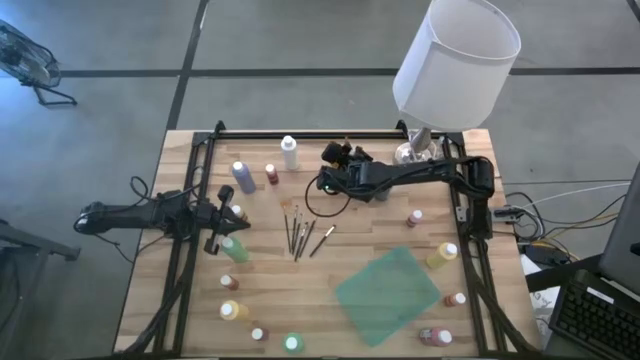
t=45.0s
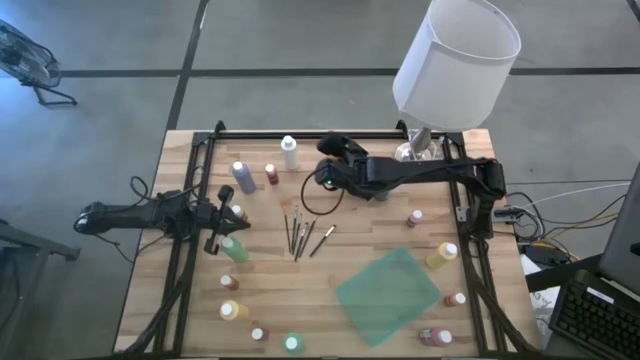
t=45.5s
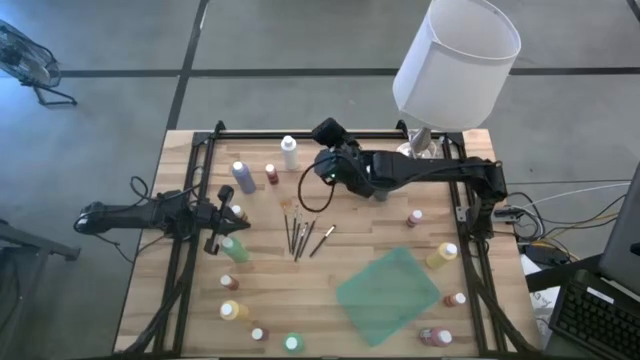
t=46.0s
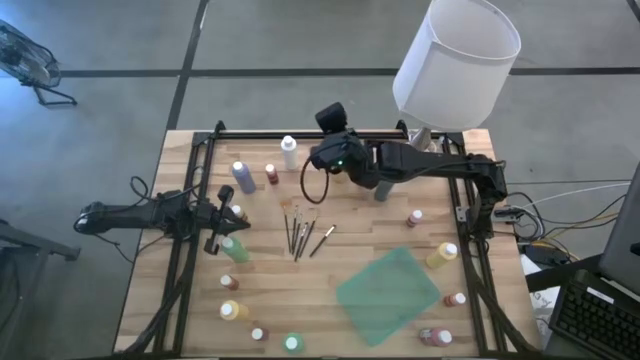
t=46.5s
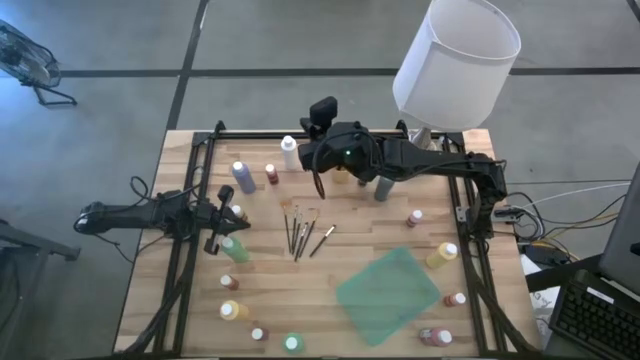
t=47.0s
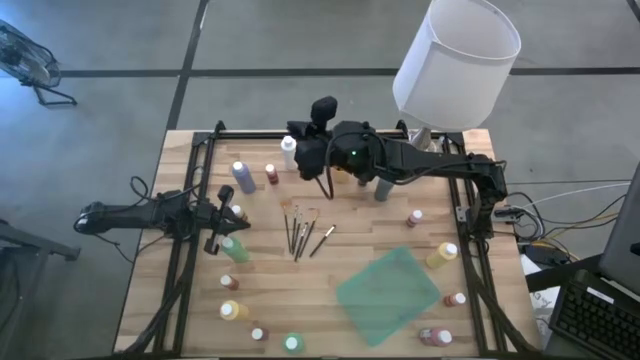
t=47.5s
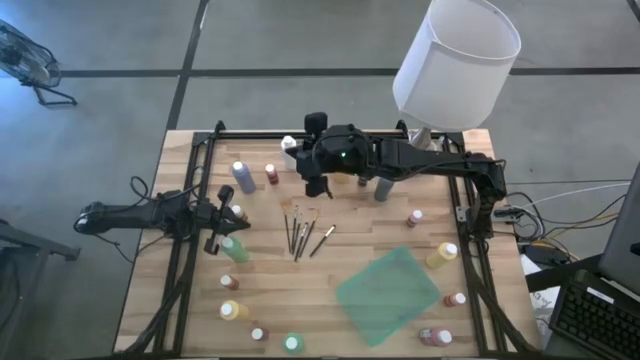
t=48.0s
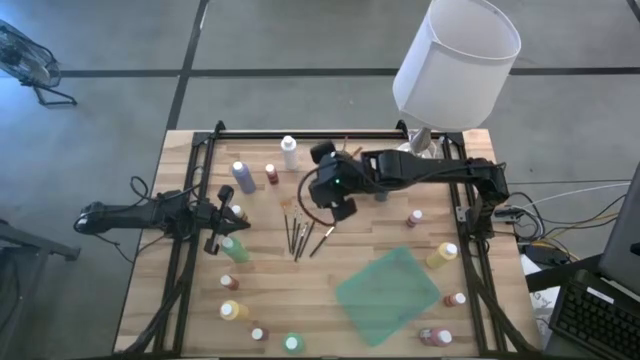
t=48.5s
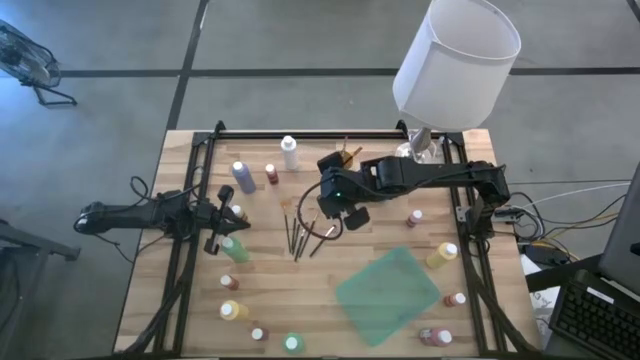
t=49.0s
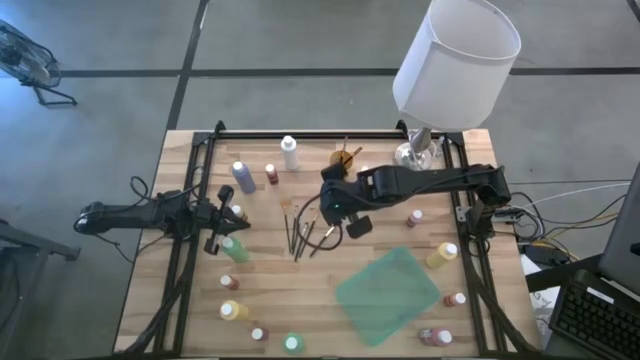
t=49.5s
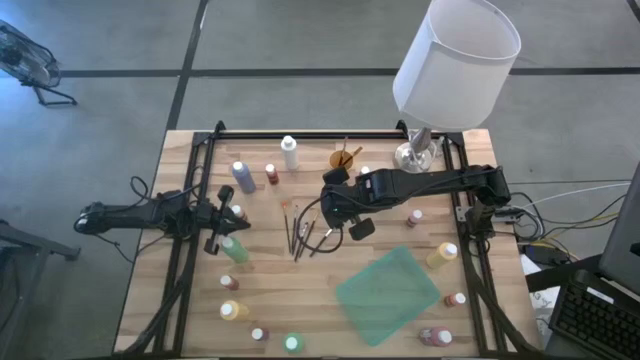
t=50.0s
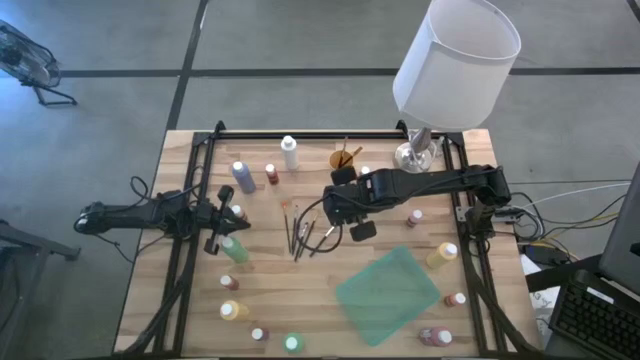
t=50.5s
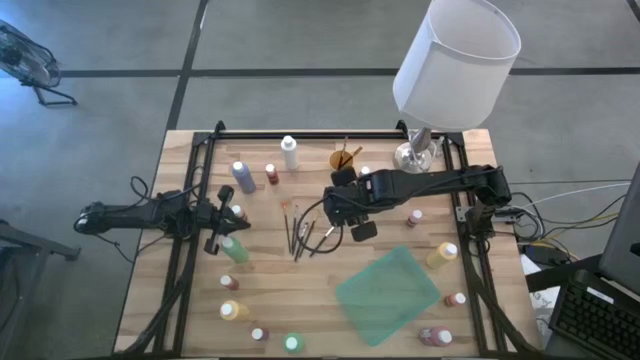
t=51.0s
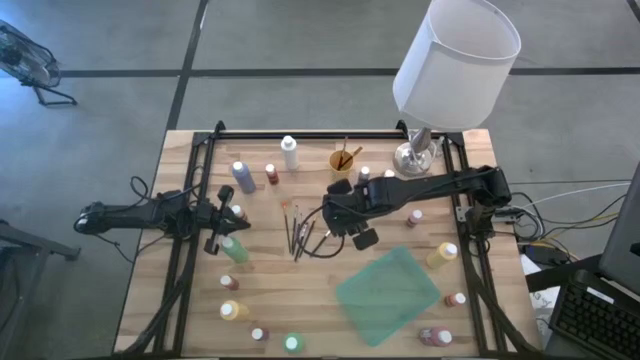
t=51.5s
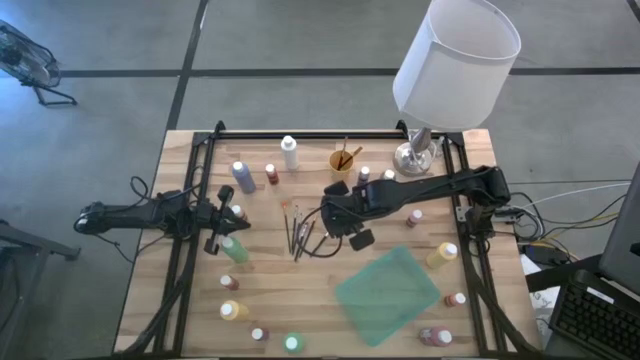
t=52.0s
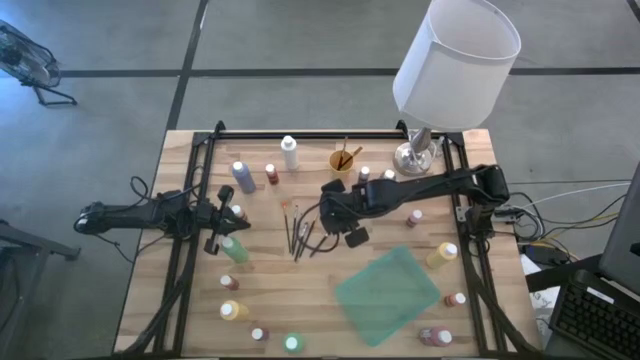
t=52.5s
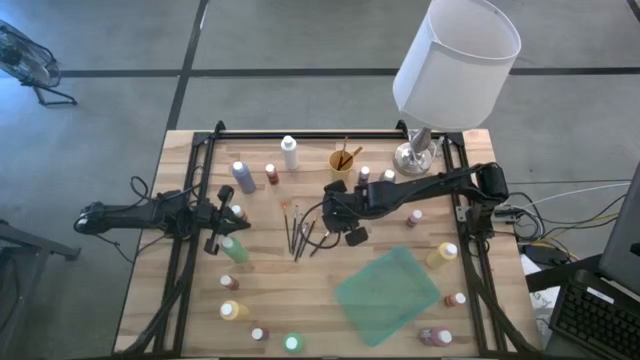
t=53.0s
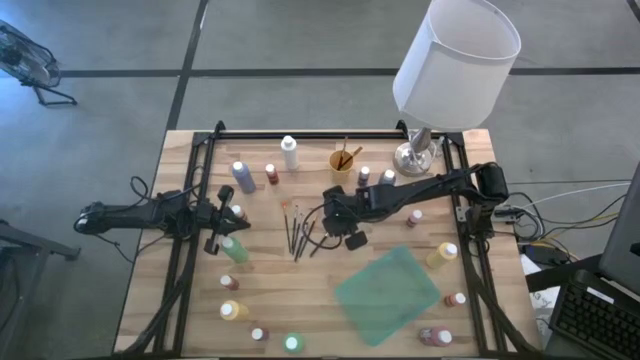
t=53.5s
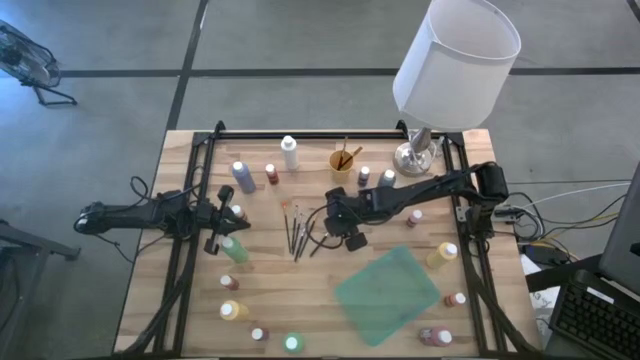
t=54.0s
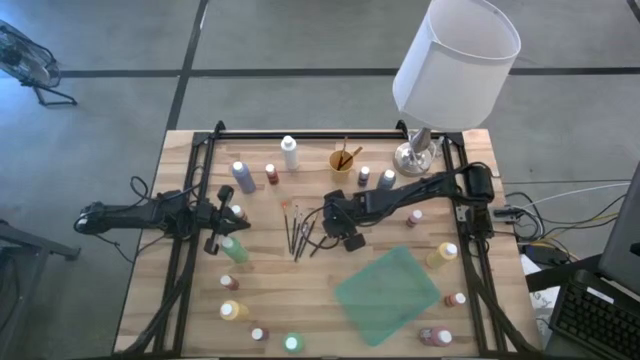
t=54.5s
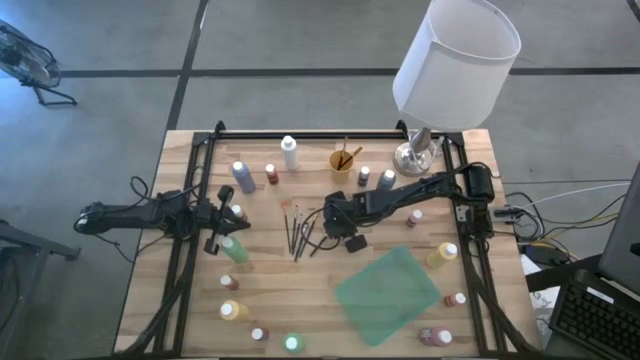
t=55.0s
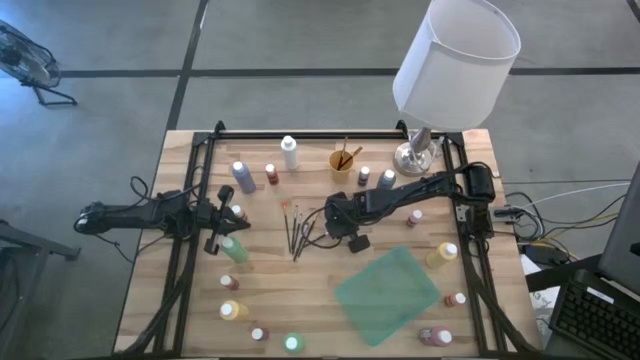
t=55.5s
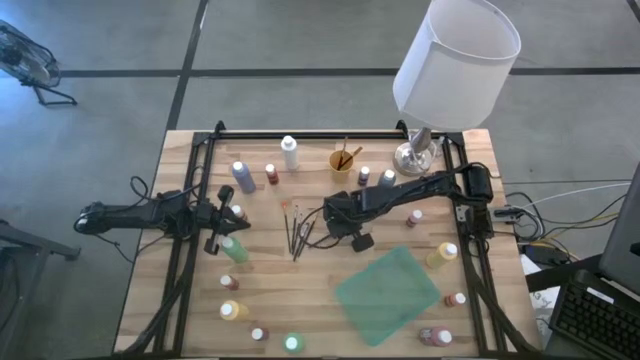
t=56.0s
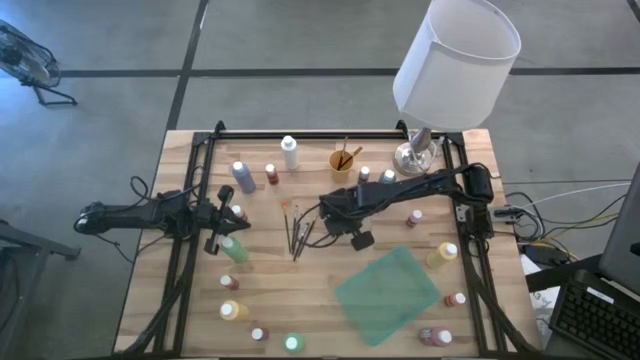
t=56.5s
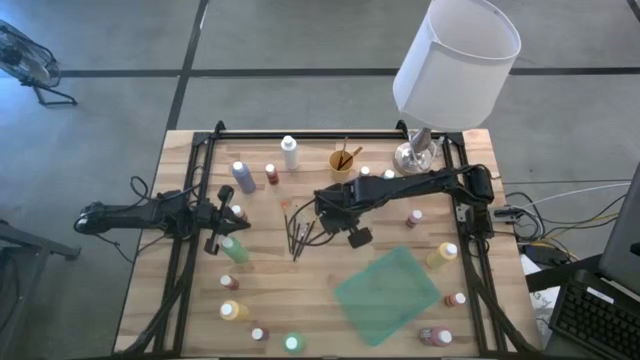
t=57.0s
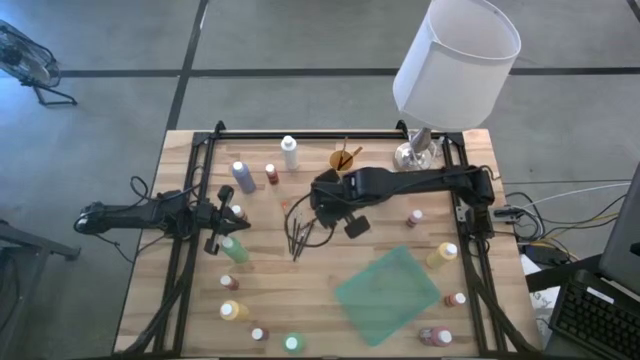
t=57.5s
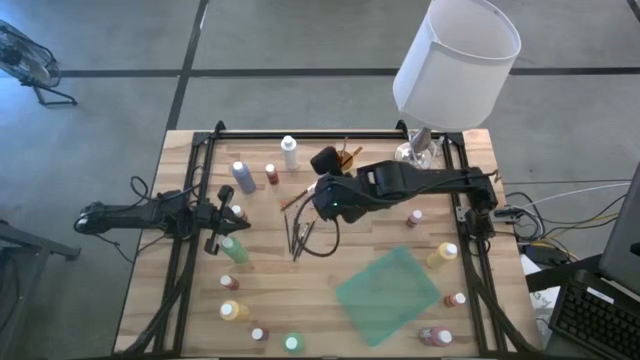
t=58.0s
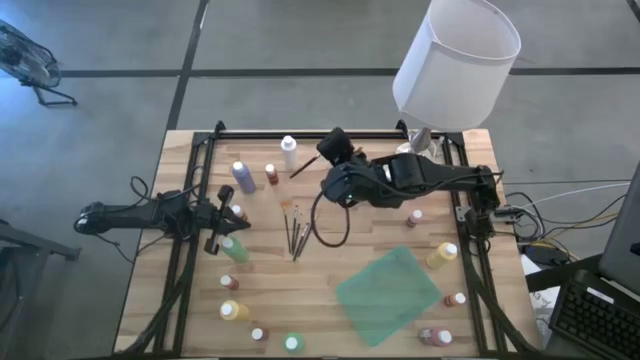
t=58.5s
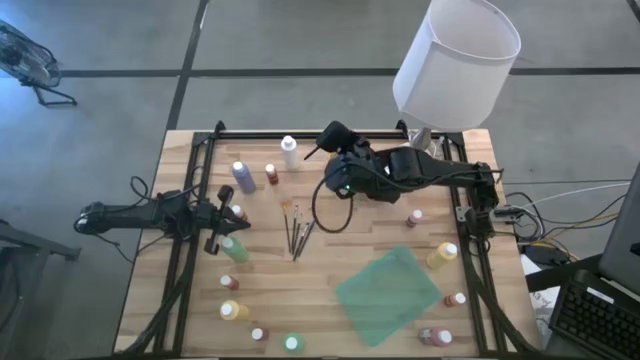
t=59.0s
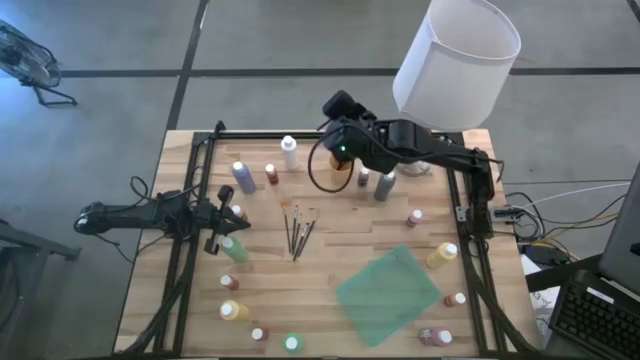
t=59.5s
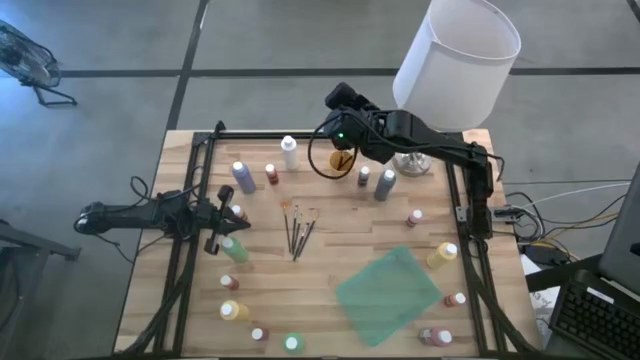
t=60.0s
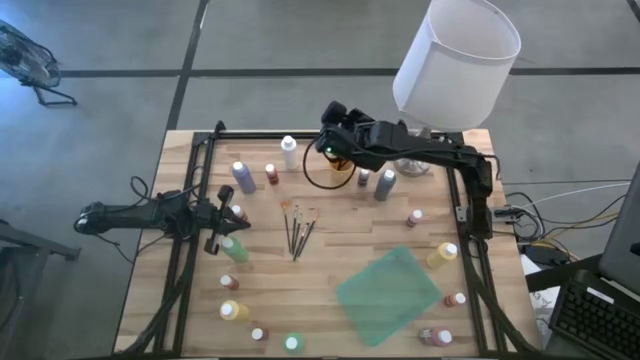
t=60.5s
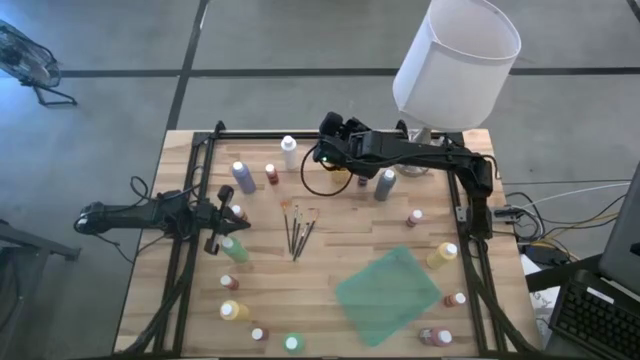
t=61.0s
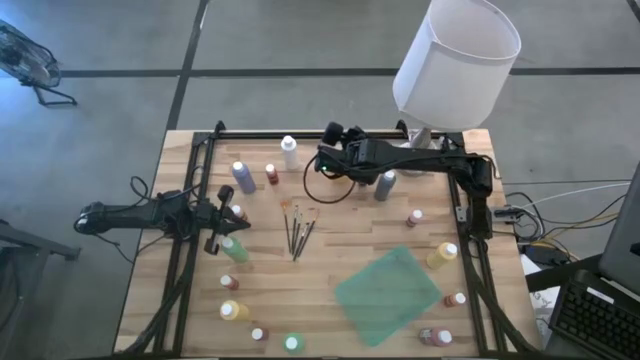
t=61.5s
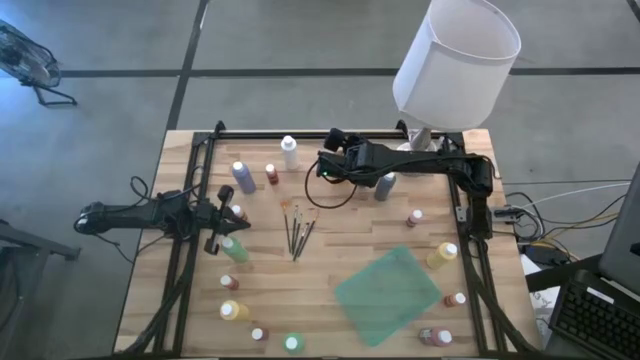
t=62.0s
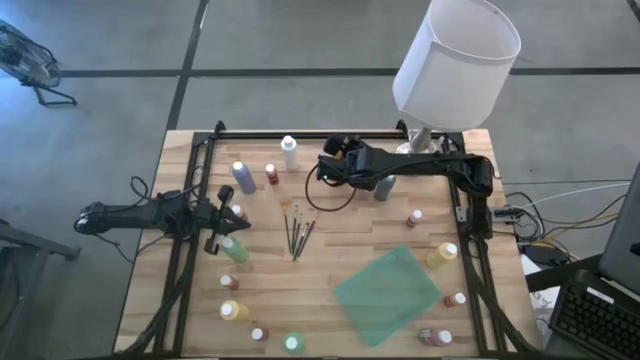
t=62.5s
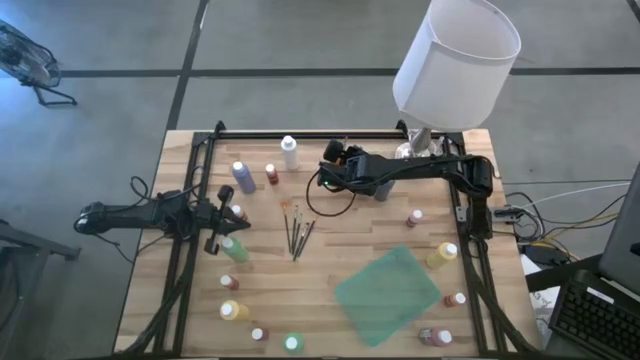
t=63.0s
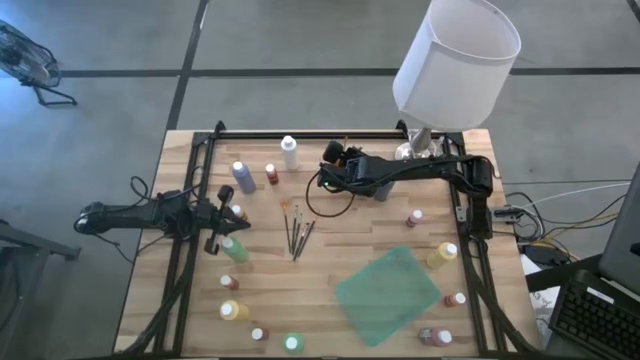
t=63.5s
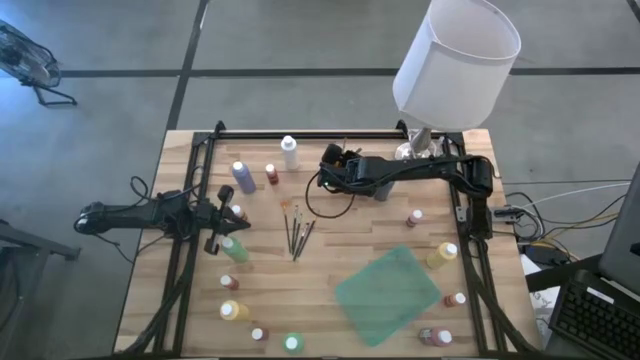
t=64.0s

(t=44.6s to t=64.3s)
Task: Pick & Place Paint Supplies
Put the silver paintbrush into the yellow cup

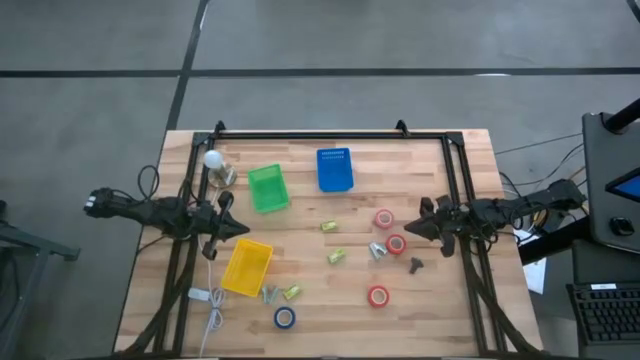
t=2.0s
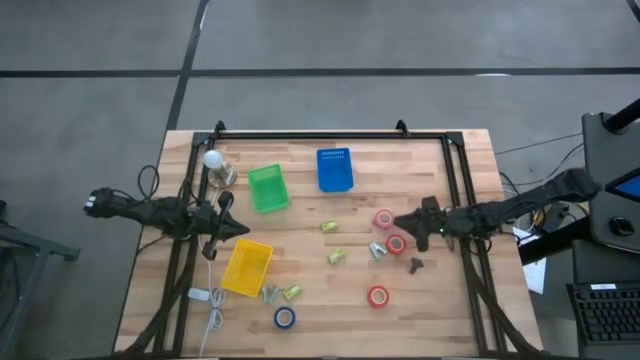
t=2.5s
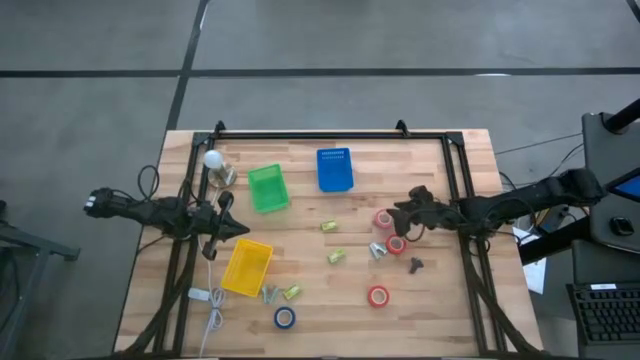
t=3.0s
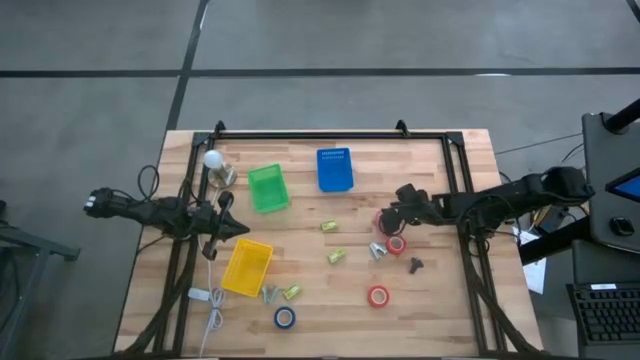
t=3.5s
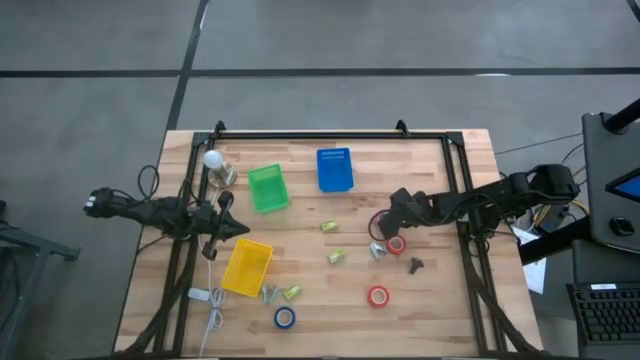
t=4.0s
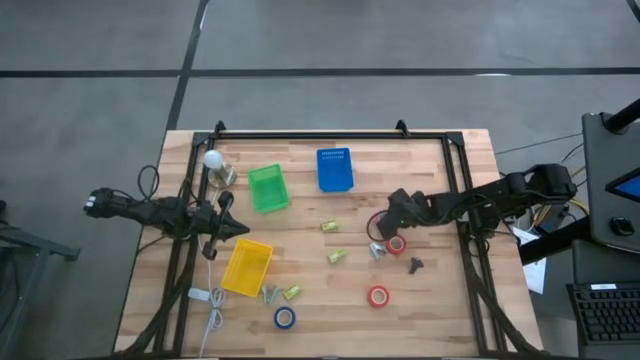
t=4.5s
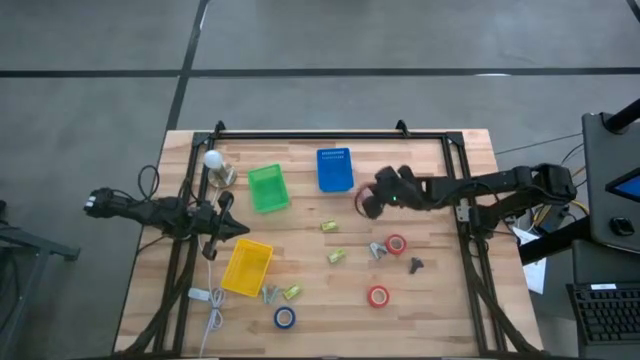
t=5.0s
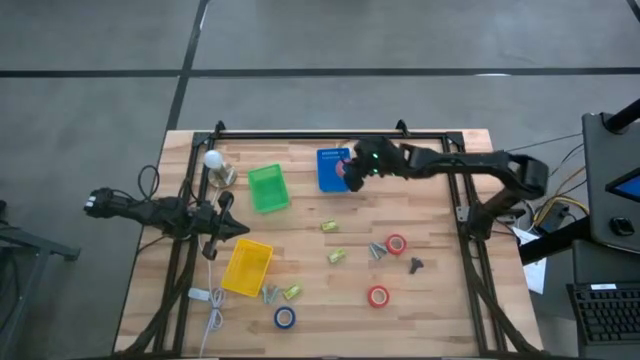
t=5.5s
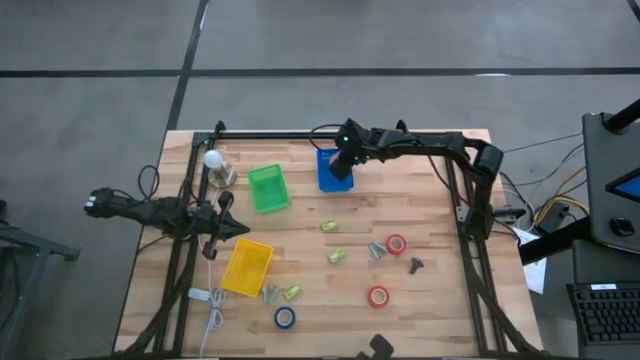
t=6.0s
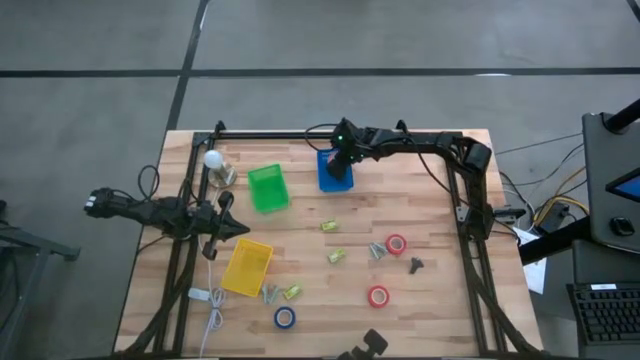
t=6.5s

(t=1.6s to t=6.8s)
Task: Pick and place Stapler, Stapler remover, tape
Put the pink tape into the blue bin
